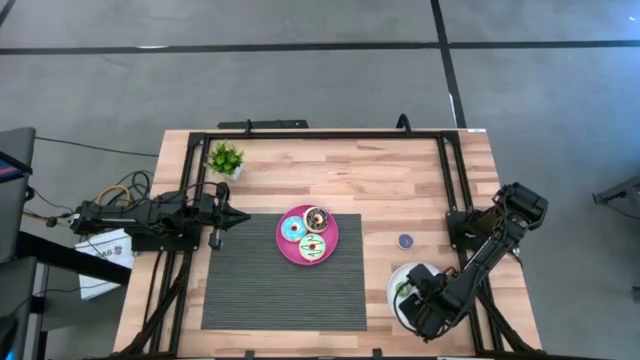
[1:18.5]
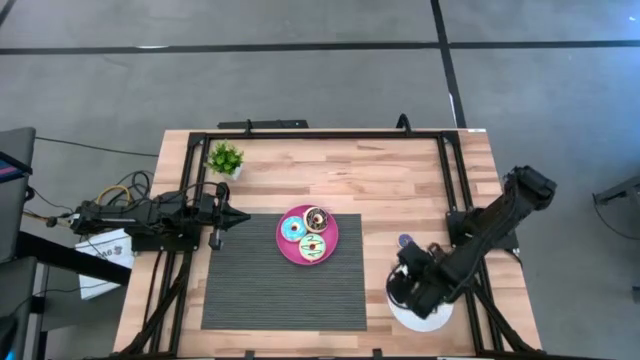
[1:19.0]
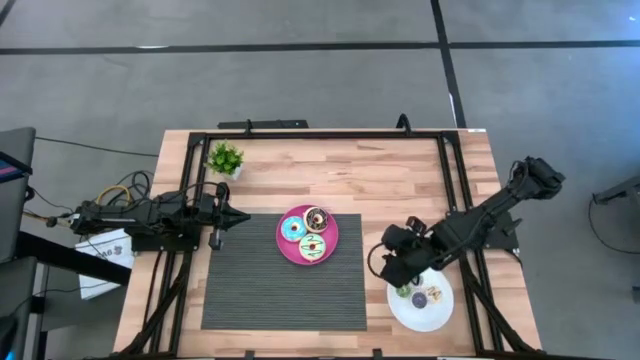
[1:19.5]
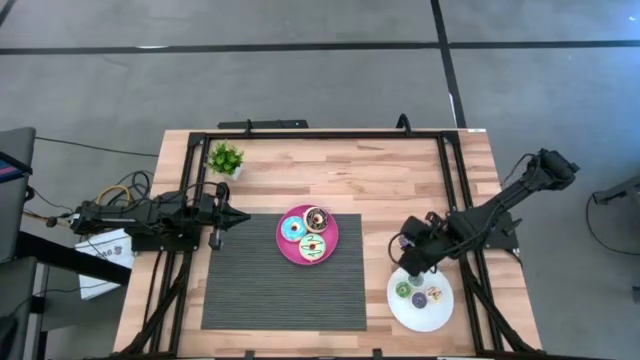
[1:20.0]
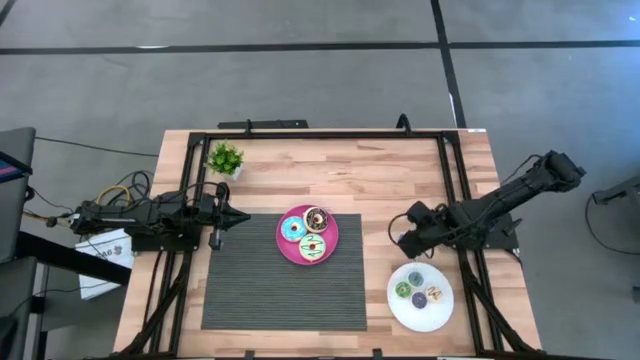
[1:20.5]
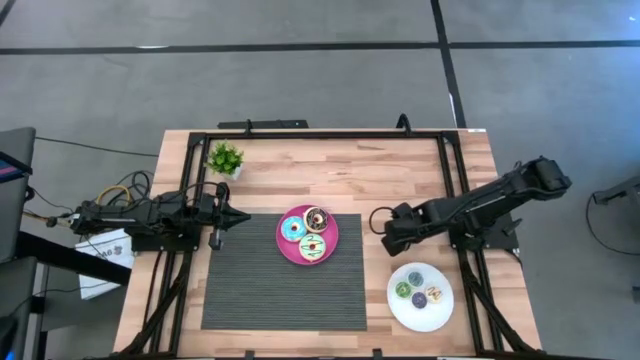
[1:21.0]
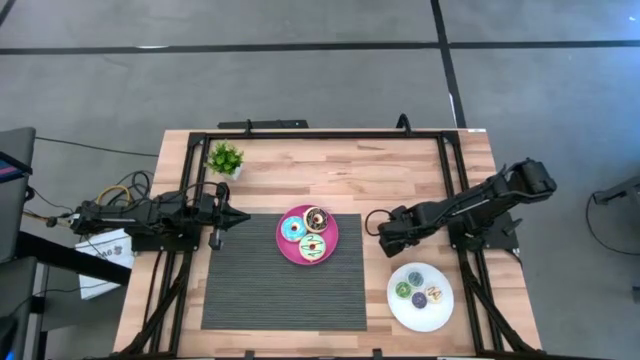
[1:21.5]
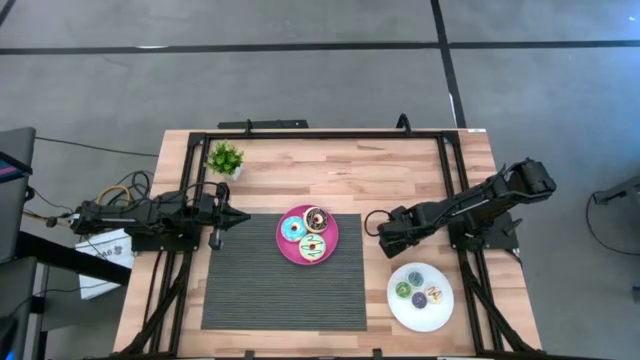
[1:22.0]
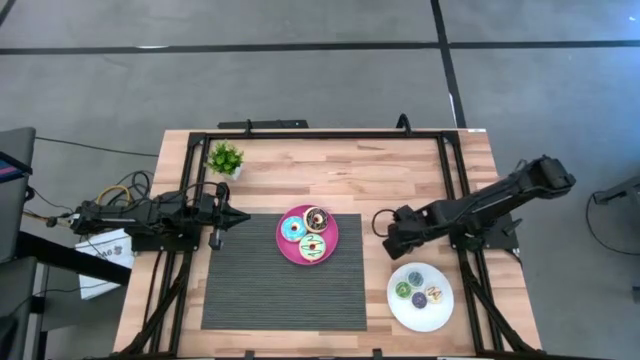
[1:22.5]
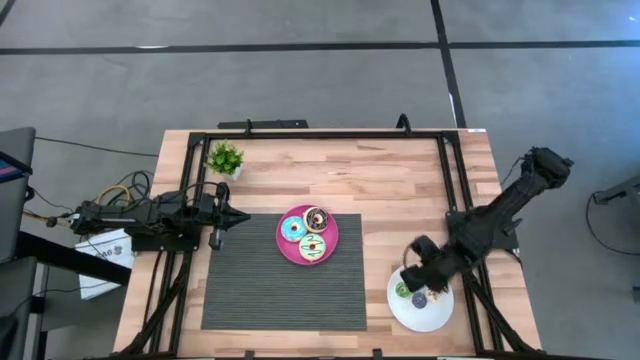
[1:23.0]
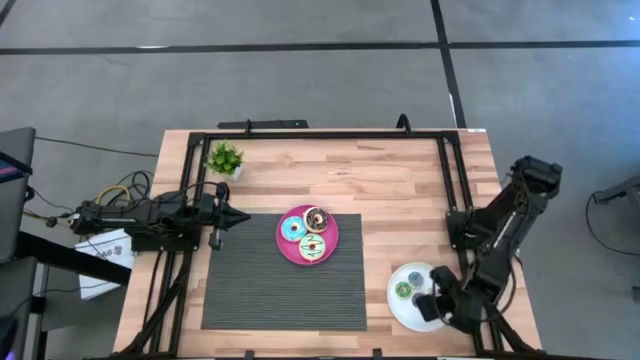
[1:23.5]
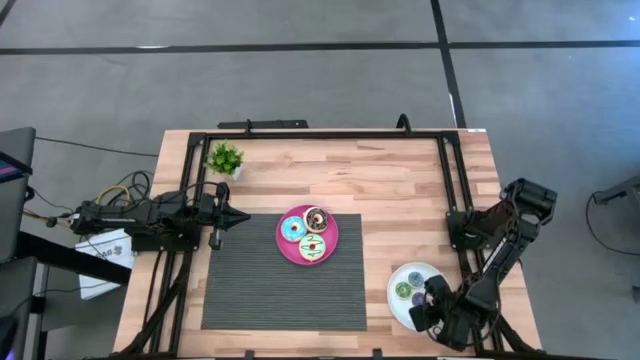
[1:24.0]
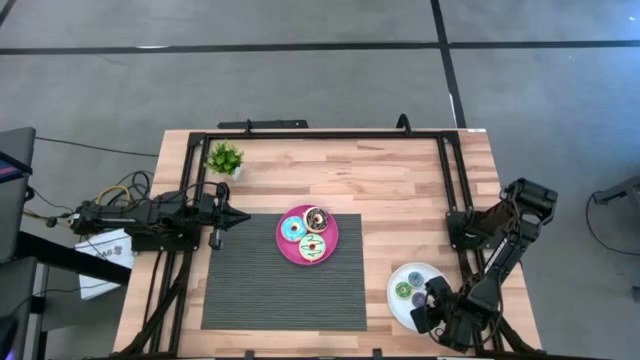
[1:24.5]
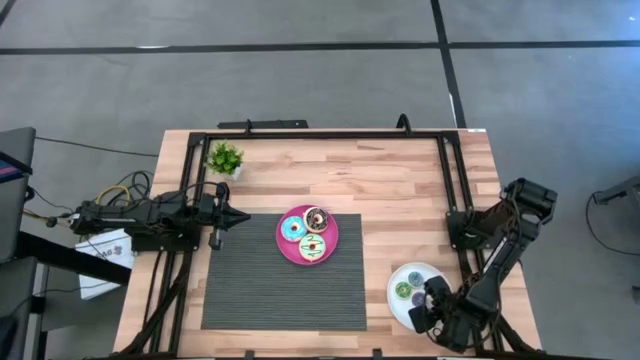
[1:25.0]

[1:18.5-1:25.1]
Task: Pick & Place donuts
Put the small dark blue donut on the white plate

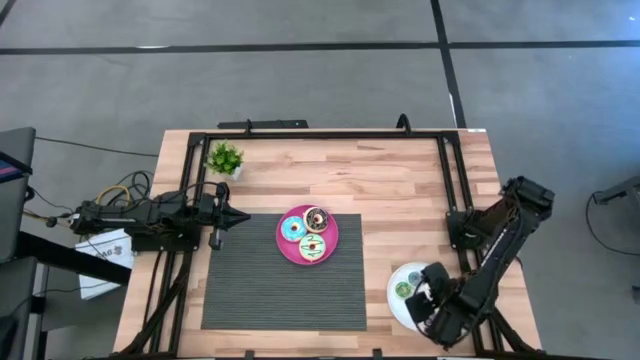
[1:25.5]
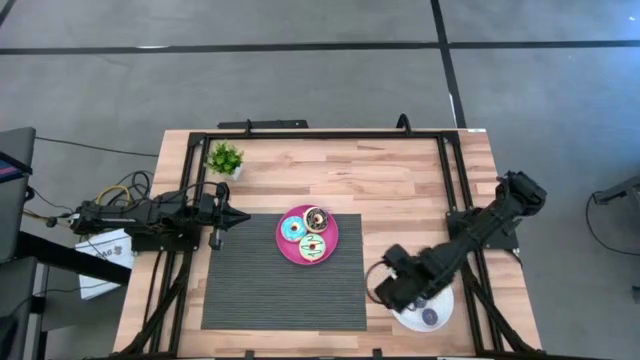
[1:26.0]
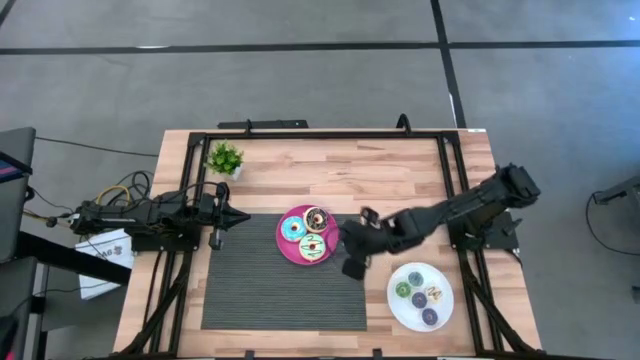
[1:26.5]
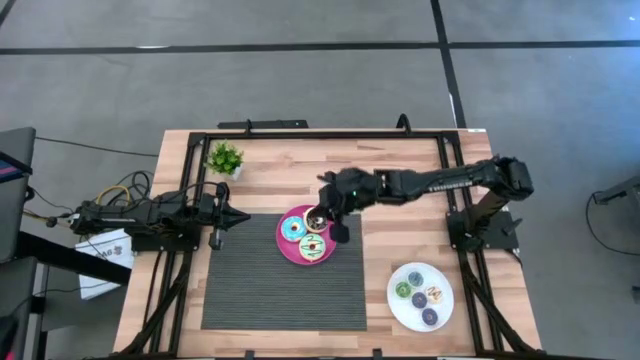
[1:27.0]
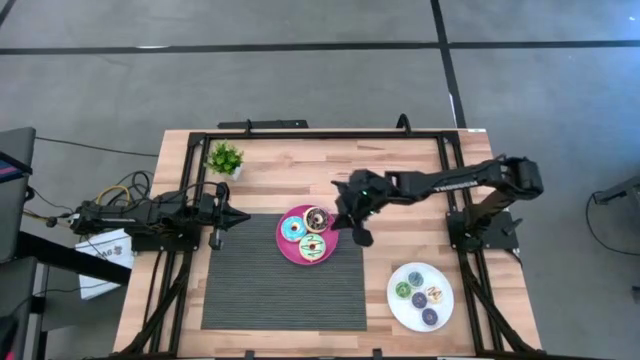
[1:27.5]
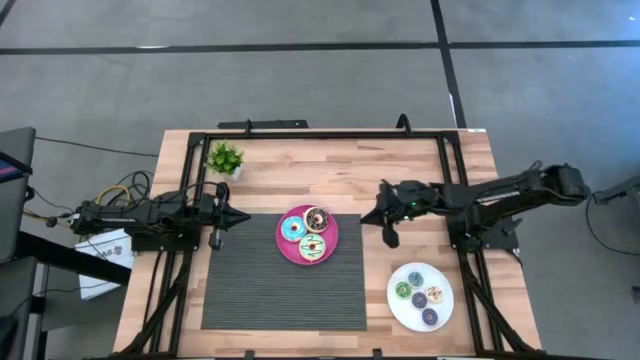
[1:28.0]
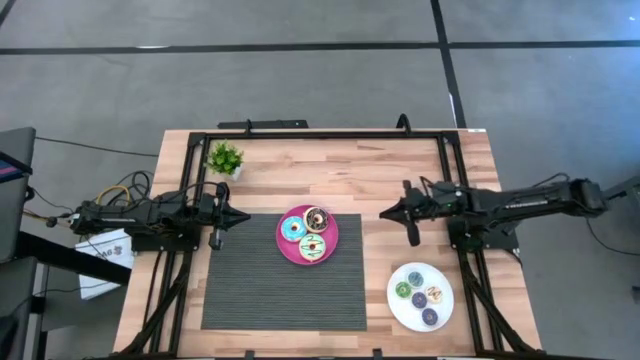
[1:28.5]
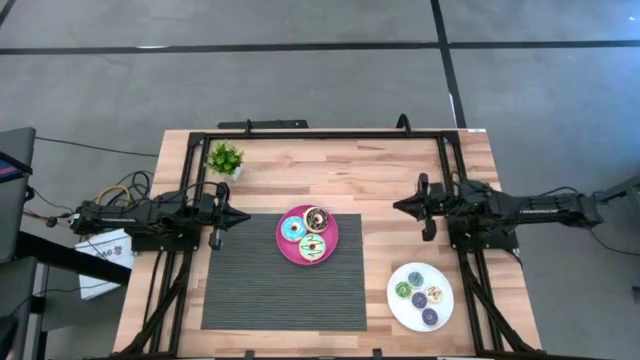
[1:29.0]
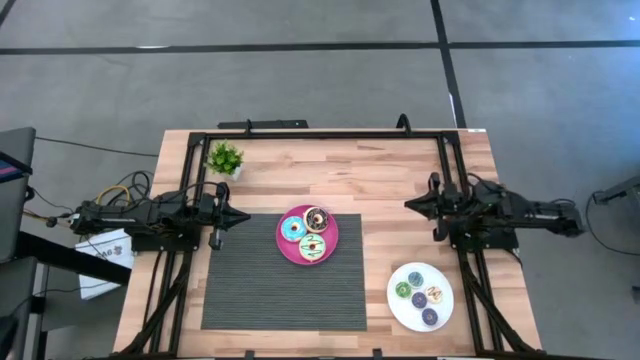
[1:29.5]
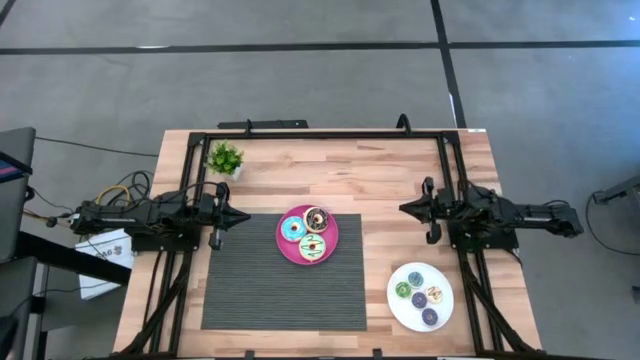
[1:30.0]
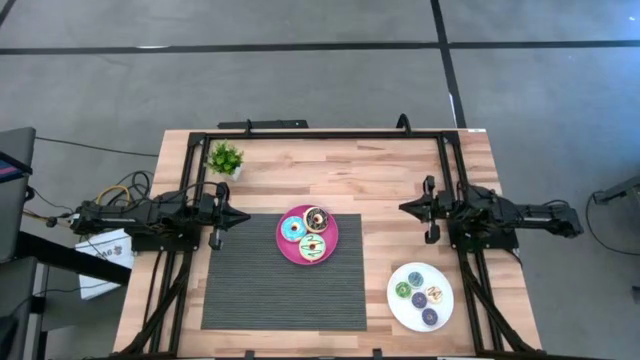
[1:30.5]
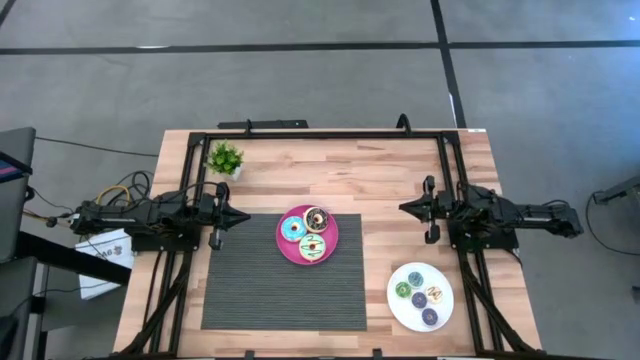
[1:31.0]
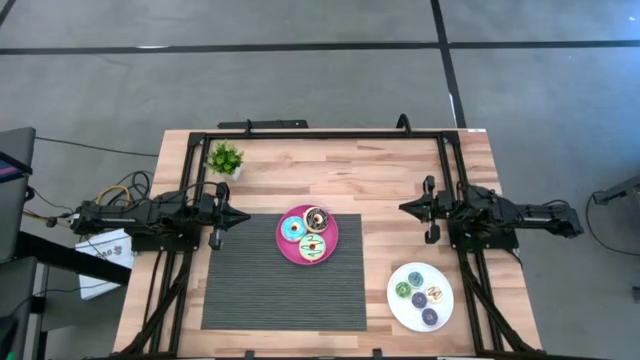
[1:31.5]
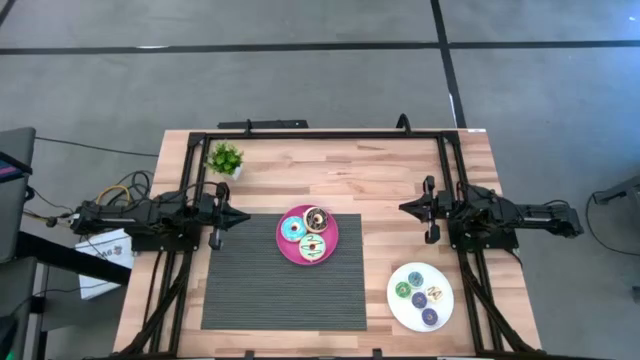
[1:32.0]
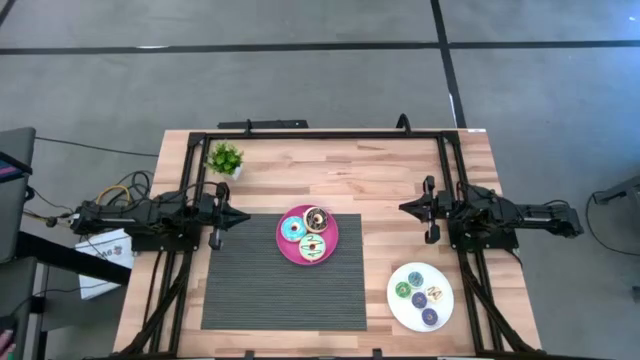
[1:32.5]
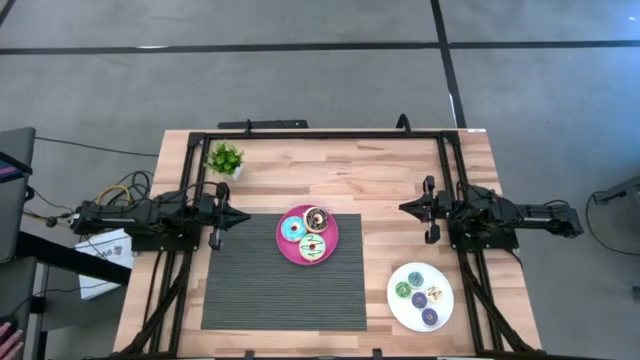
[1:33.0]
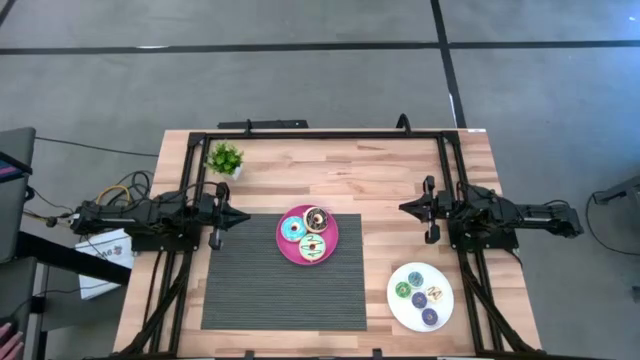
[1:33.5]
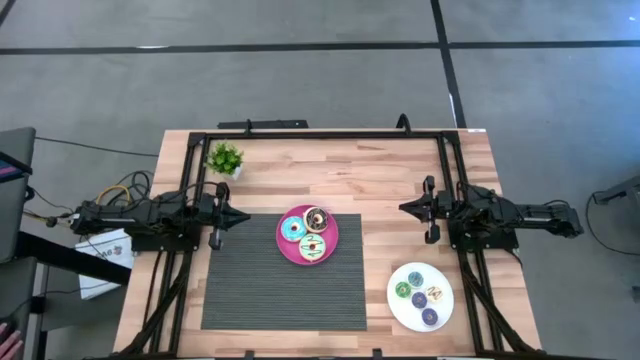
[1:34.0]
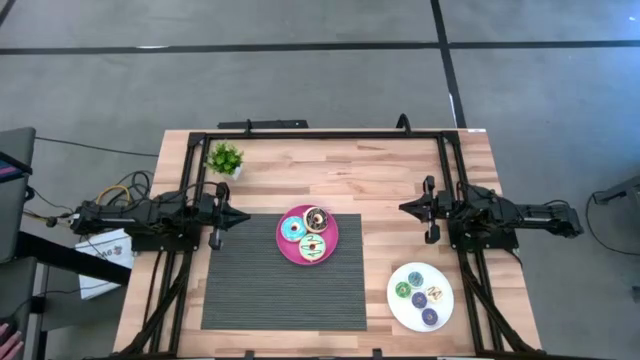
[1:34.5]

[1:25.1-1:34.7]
Return to Home Position

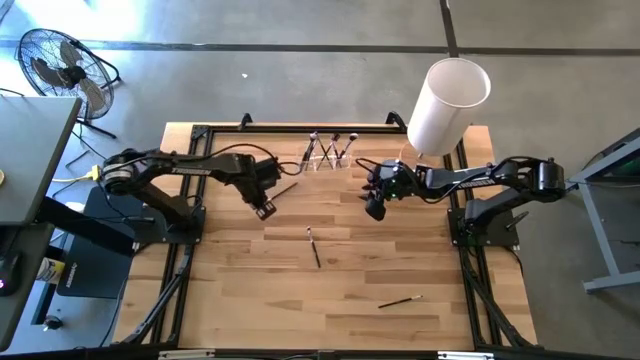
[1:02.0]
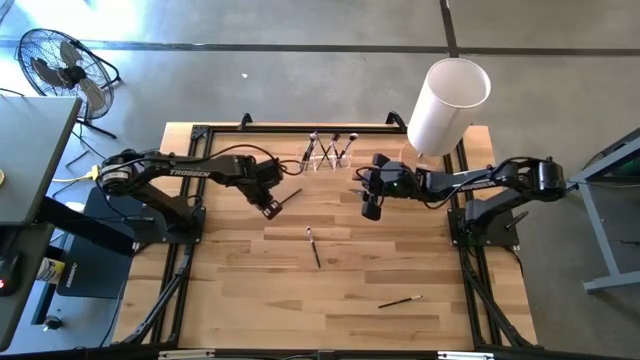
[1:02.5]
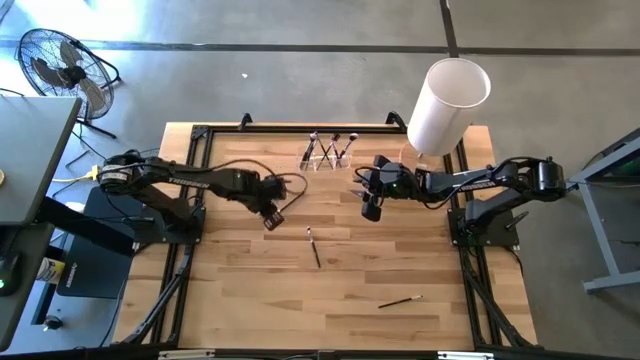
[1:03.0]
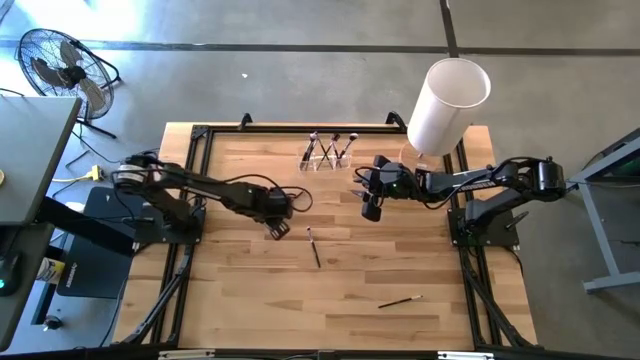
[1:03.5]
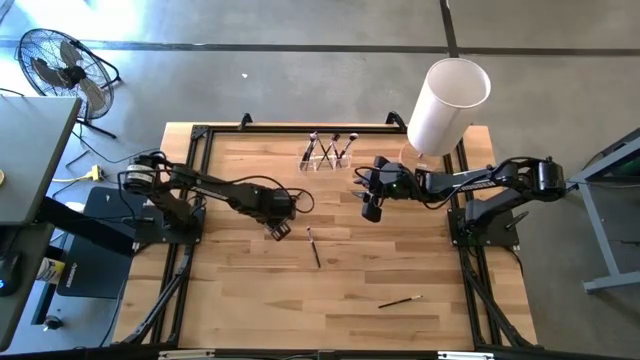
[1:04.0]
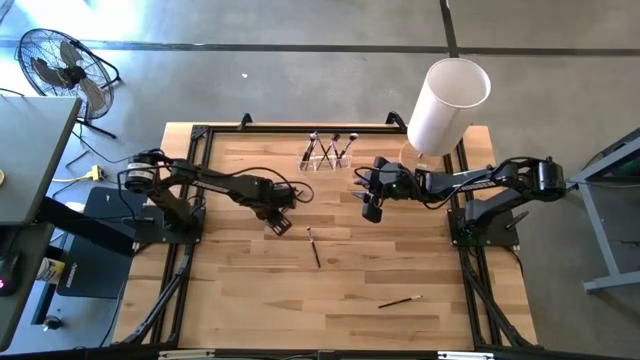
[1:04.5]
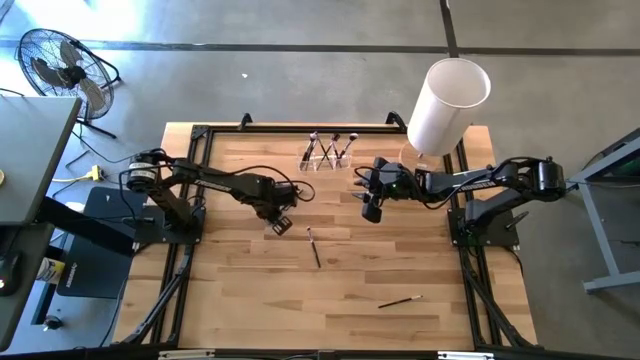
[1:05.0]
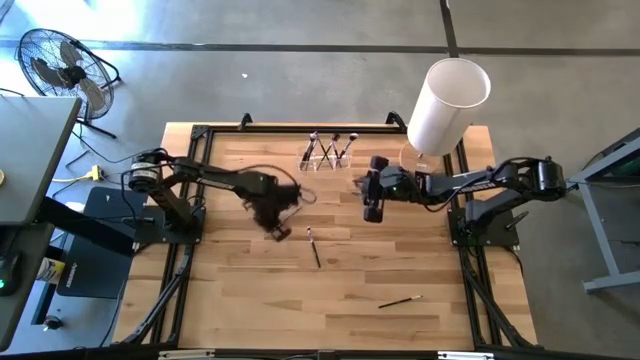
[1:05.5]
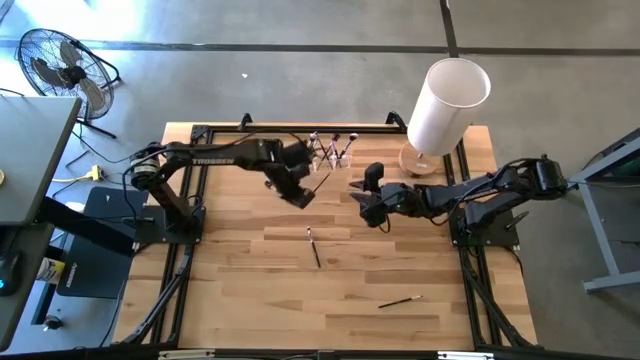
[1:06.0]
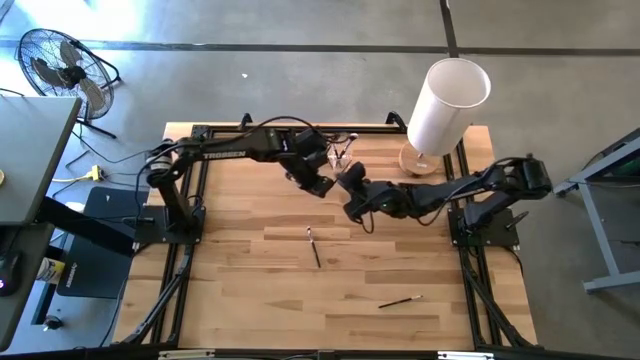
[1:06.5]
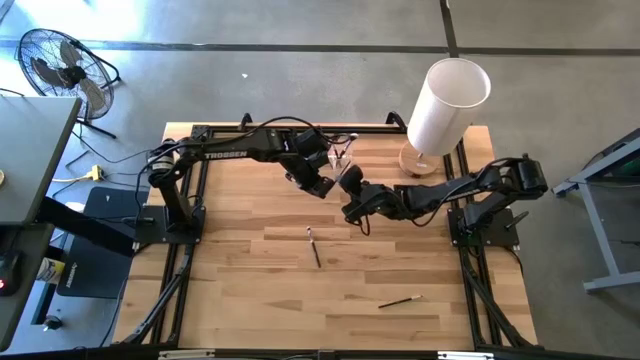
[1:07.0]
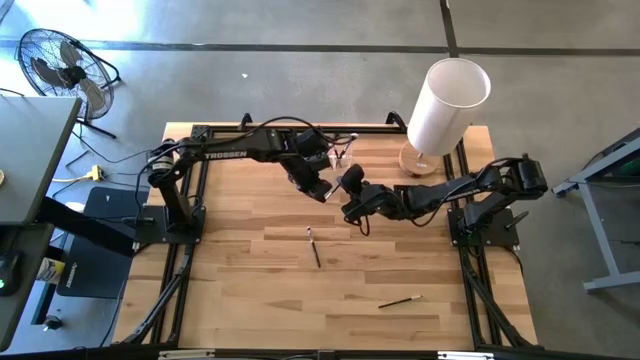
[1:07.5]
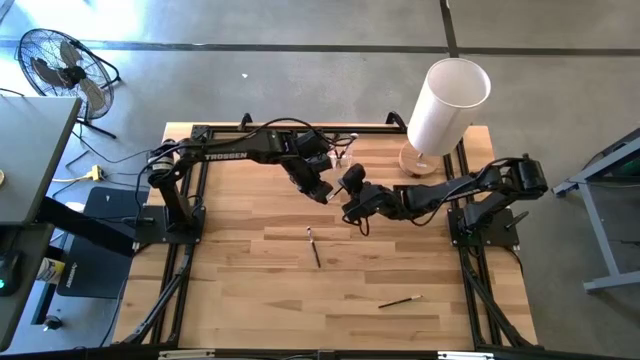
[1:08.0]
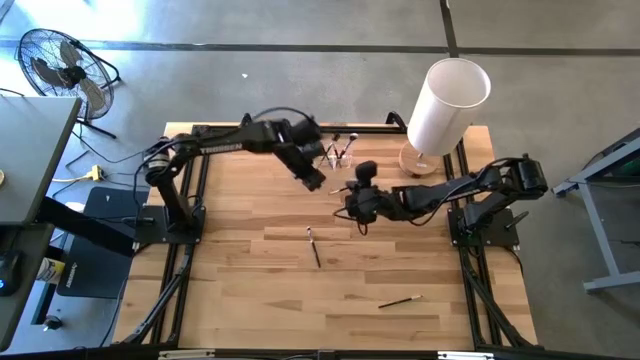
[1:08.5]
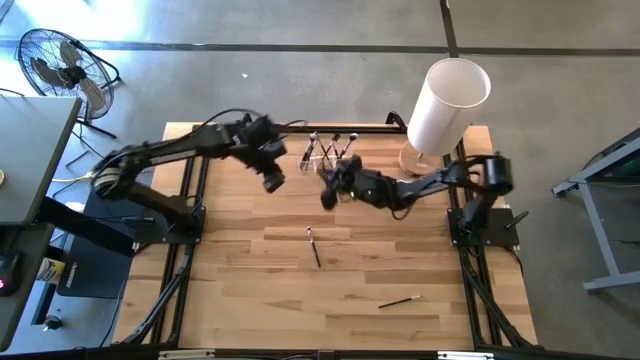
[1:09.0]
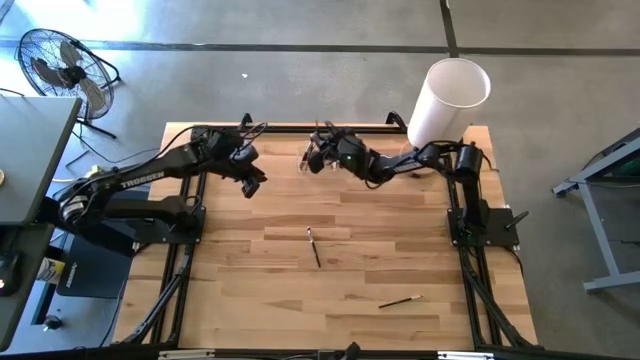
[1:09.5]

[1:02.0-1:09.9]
Task: Pick & Place Makeup Brushes
Put the black eyeshadow brush into the transparent organizer
